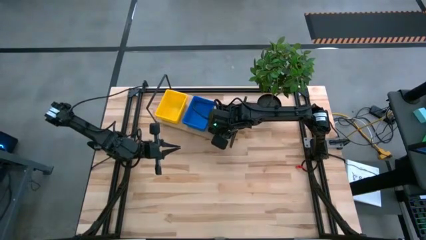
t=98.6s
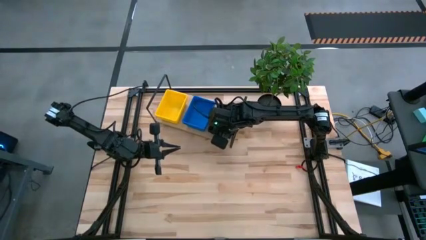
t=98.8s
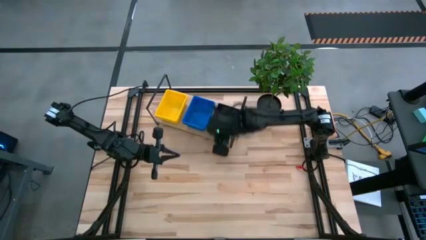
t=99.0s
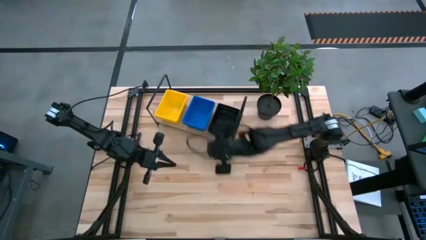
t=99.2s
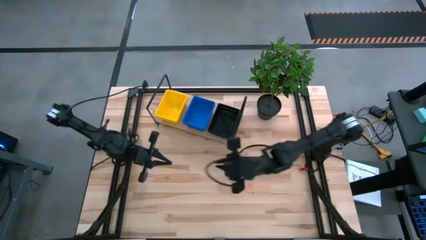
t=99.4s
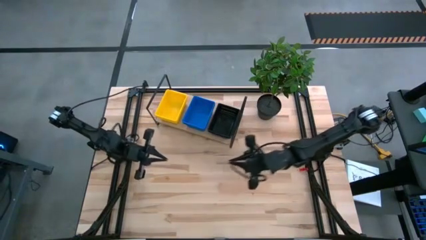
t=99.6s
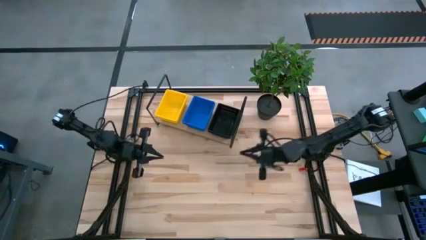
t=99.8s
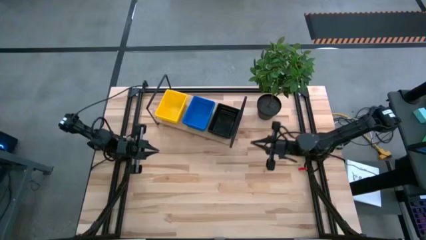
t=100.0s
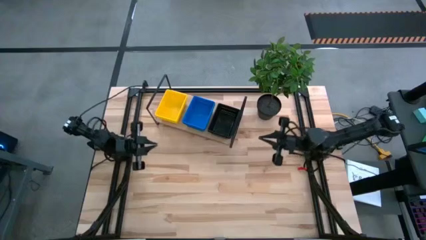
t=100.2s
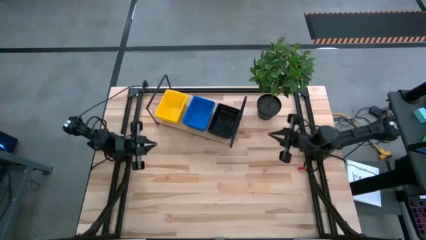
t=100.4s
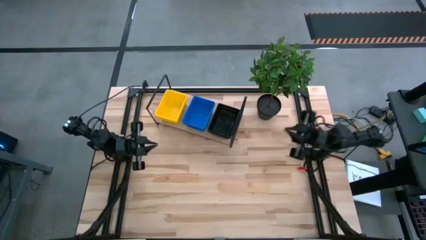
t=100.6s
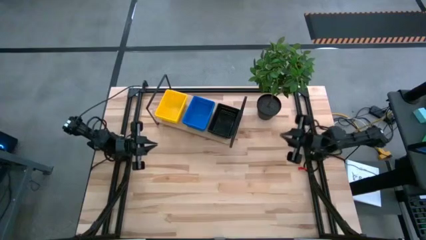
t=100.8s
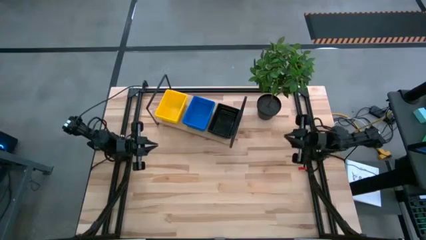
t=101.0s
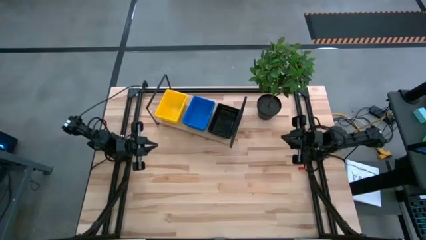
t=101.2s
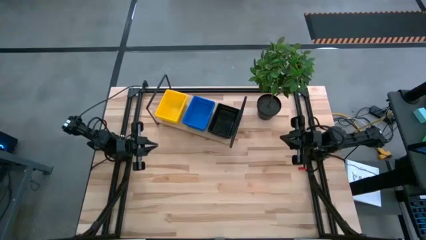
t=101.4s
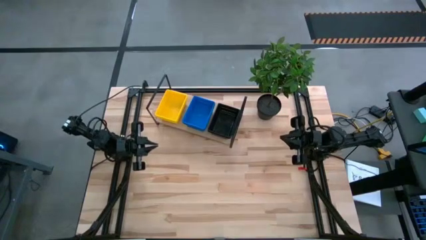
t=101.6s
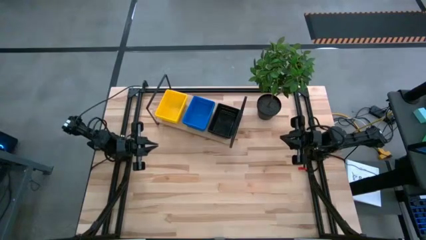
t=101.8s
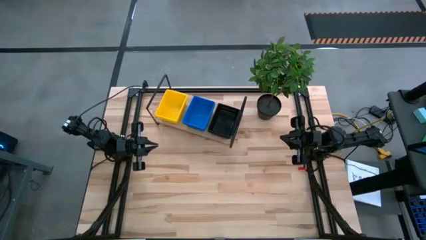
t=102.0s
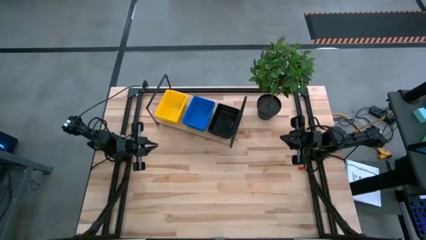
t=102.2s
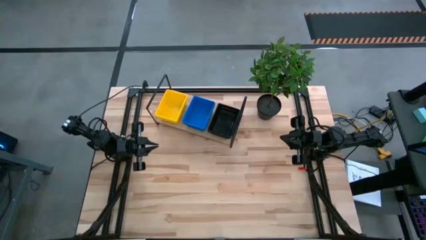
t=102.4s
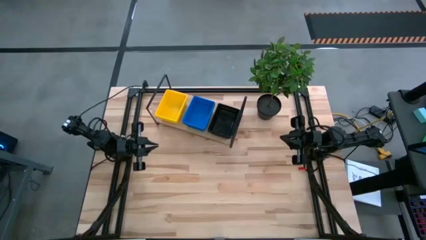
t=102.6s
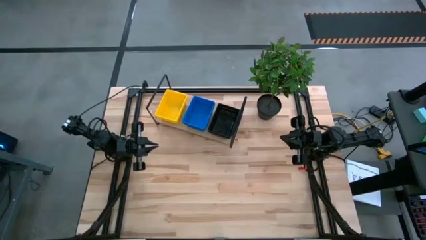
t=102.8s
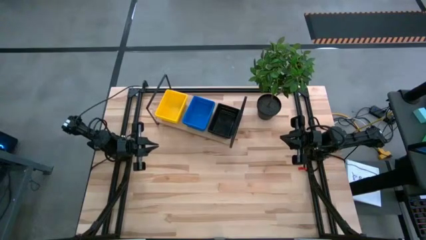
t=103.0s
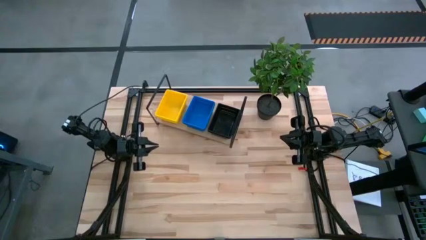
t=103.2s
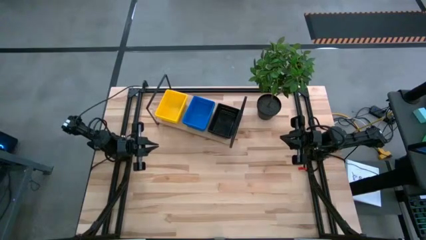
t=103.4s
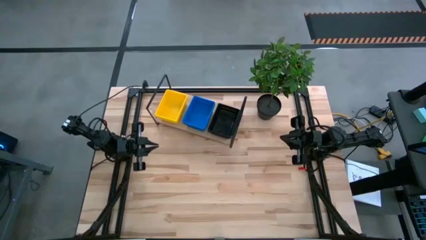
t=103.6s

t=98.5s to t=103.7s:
Task: Stack baskets on shelf by color
Return to Home Position

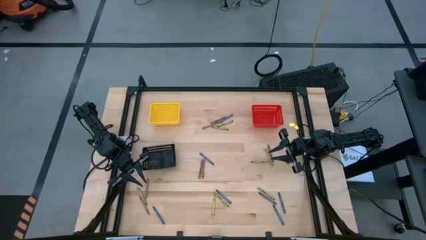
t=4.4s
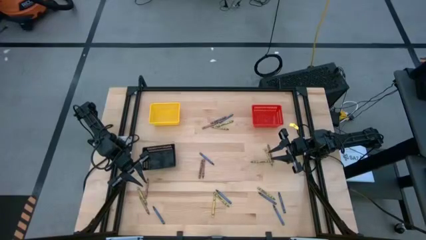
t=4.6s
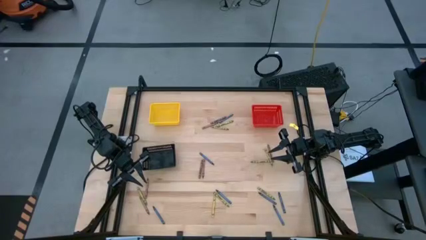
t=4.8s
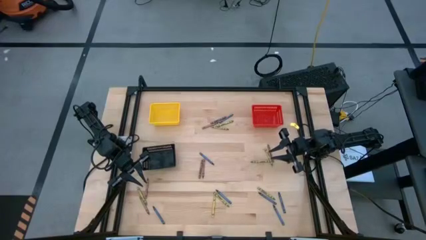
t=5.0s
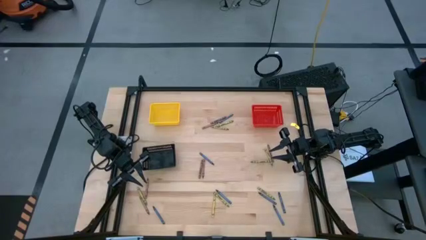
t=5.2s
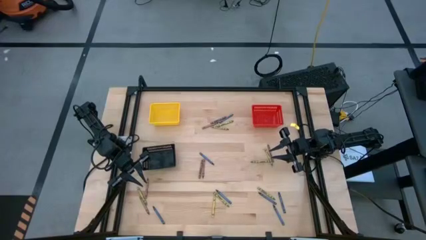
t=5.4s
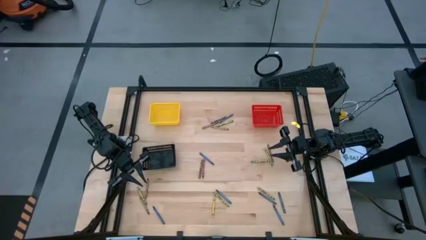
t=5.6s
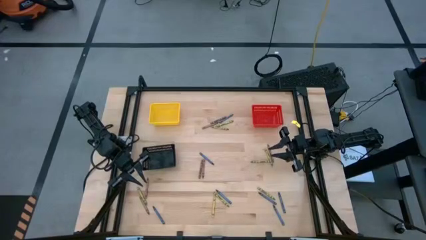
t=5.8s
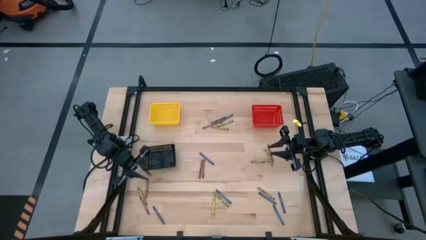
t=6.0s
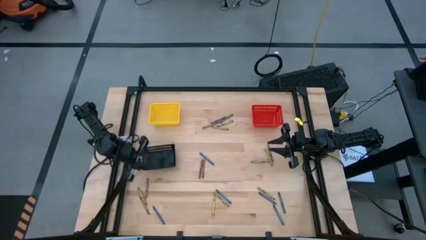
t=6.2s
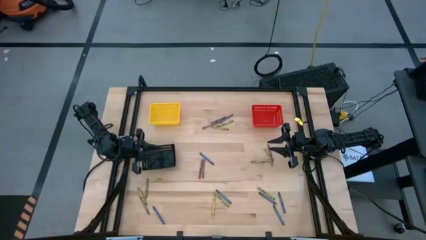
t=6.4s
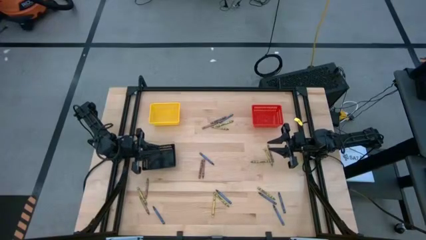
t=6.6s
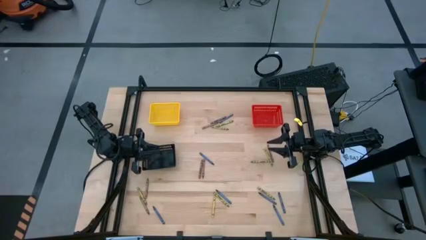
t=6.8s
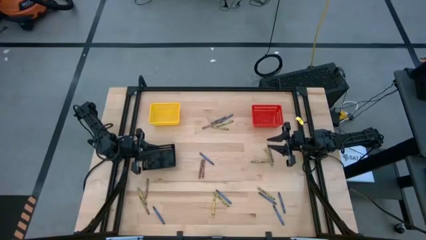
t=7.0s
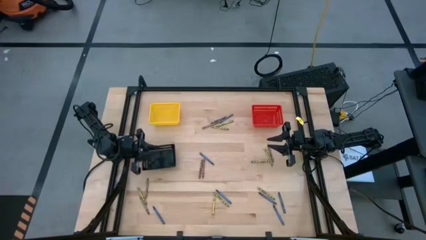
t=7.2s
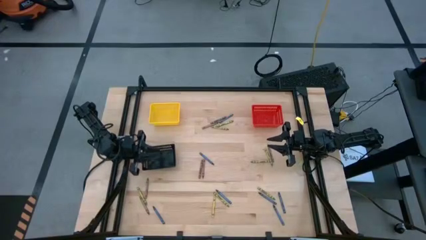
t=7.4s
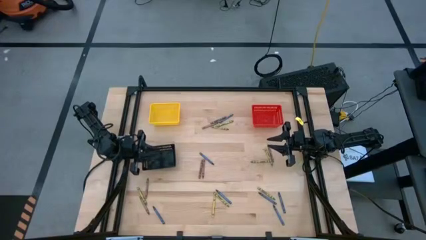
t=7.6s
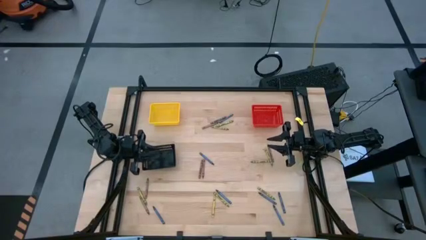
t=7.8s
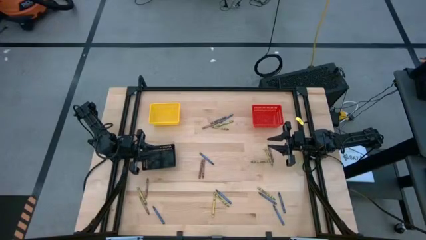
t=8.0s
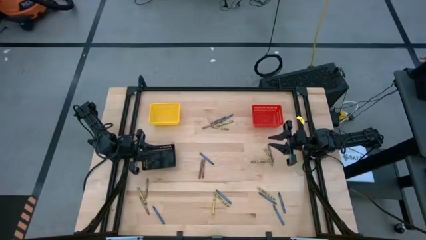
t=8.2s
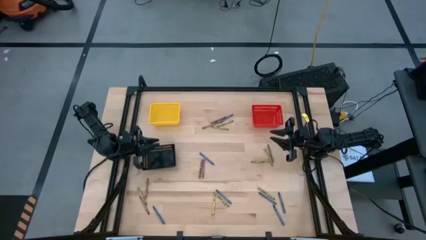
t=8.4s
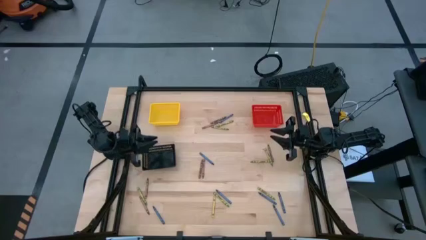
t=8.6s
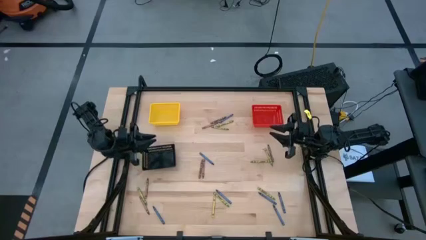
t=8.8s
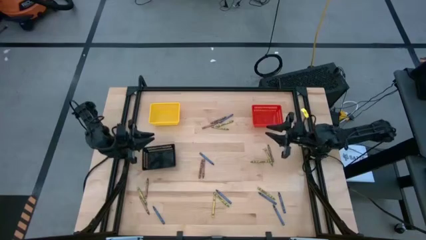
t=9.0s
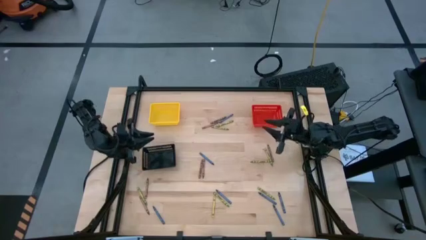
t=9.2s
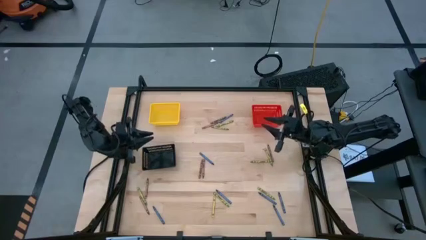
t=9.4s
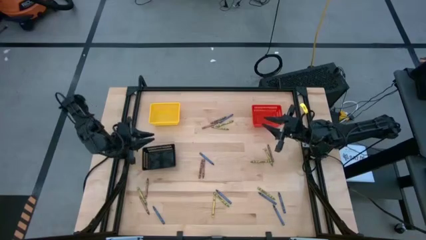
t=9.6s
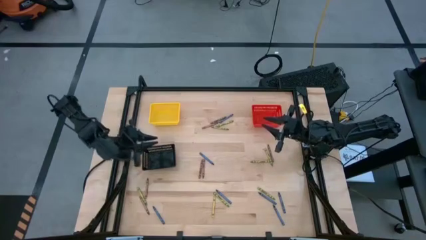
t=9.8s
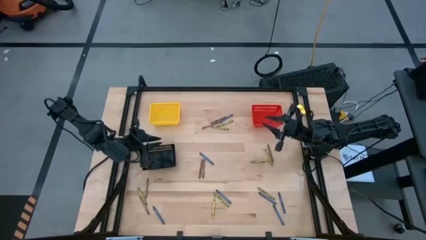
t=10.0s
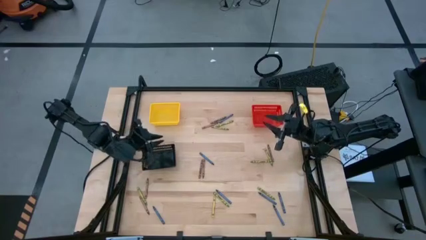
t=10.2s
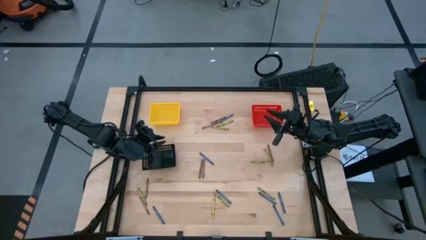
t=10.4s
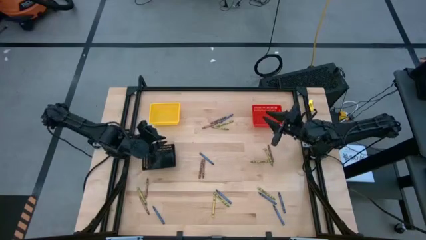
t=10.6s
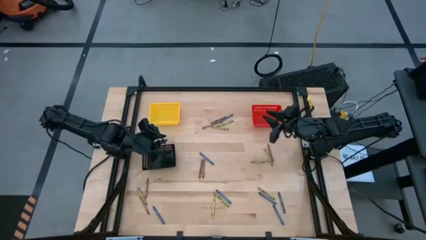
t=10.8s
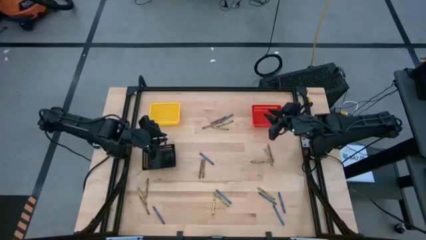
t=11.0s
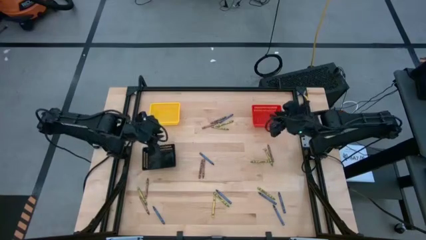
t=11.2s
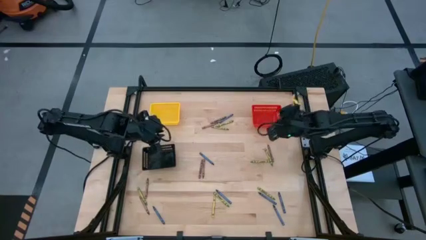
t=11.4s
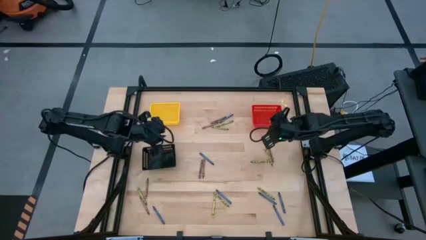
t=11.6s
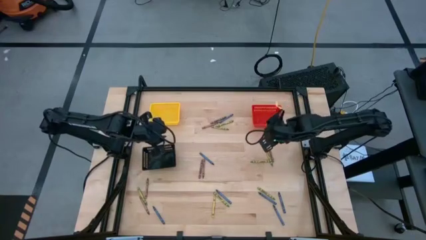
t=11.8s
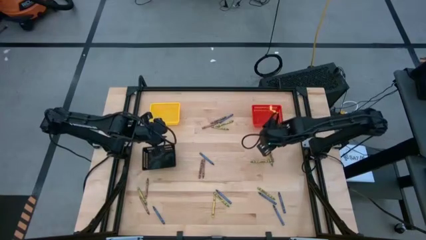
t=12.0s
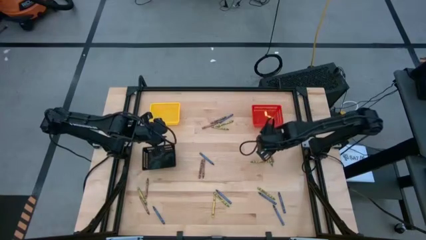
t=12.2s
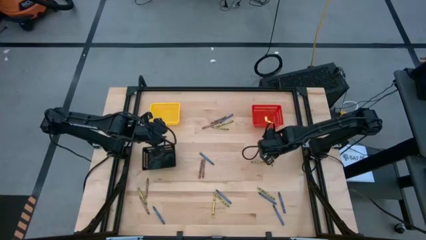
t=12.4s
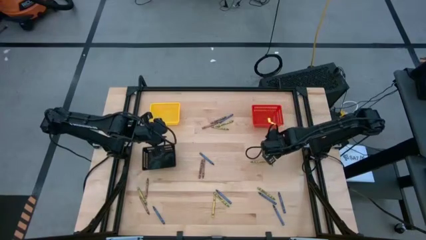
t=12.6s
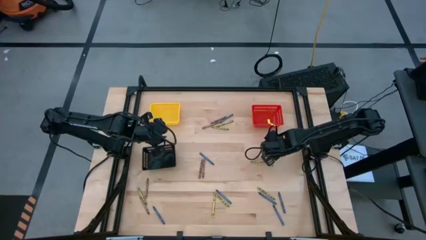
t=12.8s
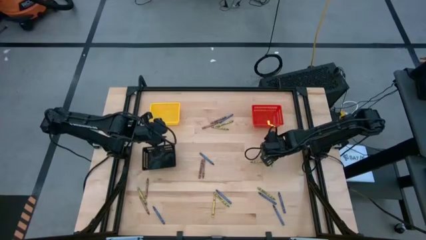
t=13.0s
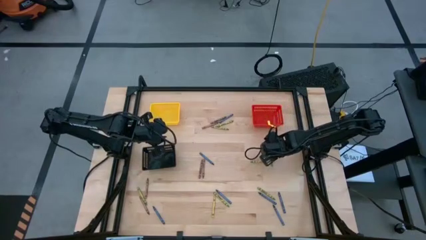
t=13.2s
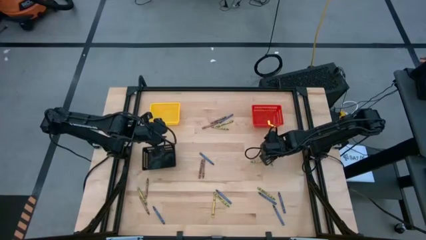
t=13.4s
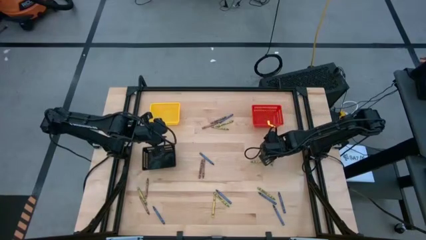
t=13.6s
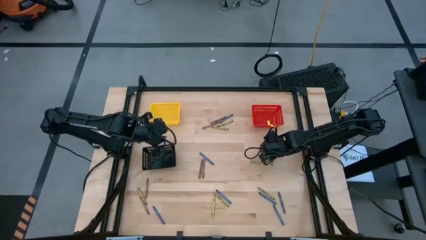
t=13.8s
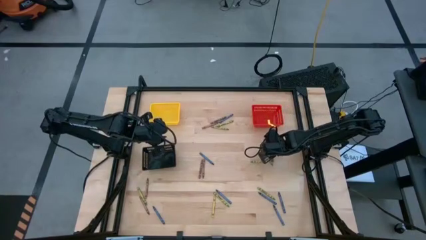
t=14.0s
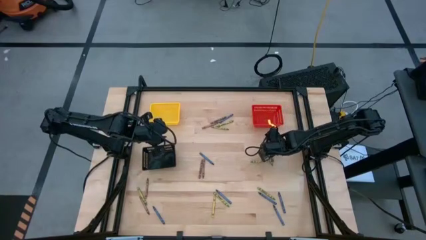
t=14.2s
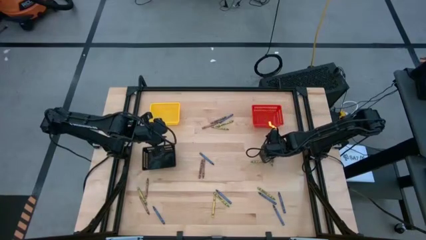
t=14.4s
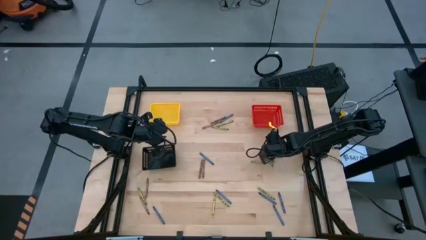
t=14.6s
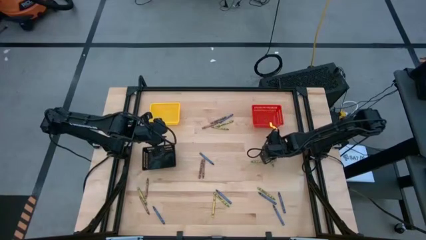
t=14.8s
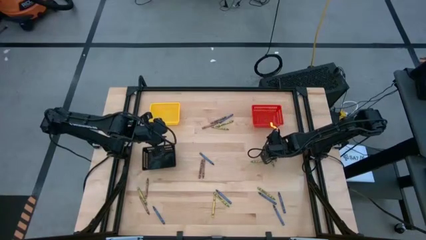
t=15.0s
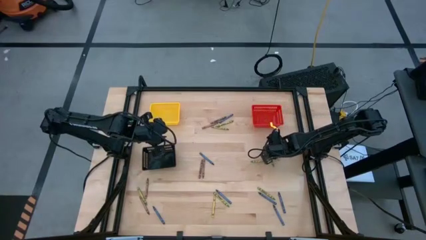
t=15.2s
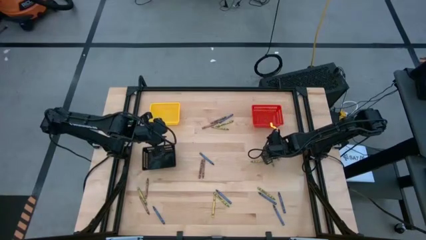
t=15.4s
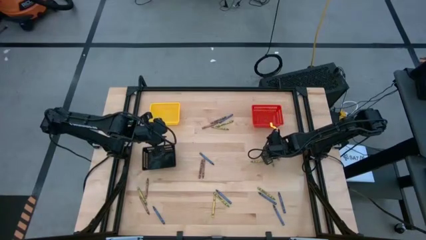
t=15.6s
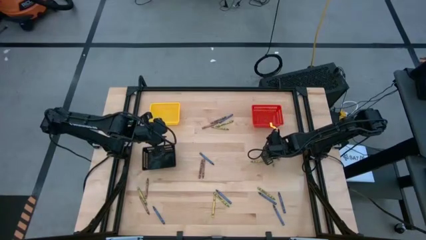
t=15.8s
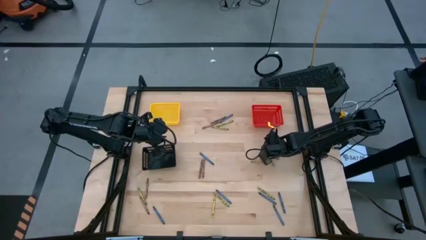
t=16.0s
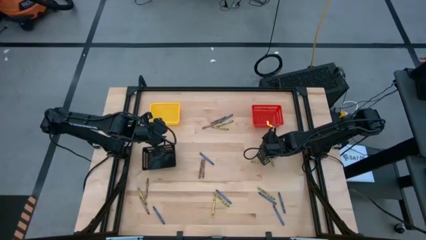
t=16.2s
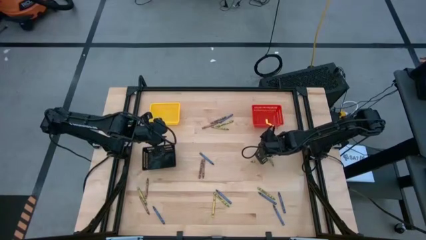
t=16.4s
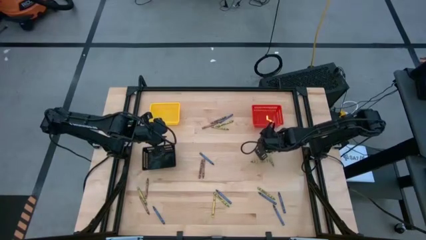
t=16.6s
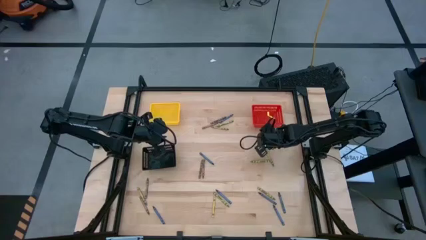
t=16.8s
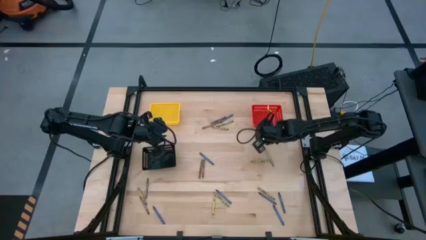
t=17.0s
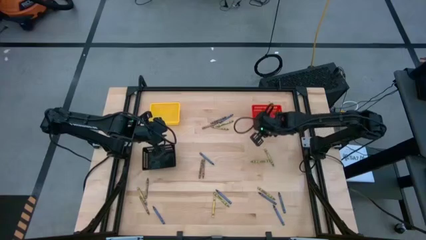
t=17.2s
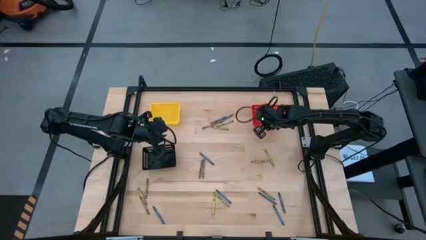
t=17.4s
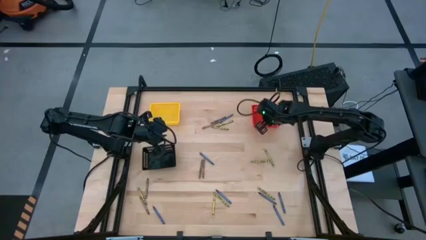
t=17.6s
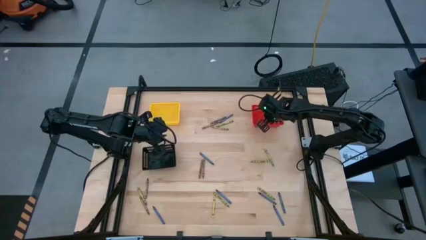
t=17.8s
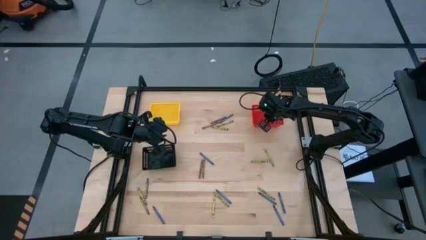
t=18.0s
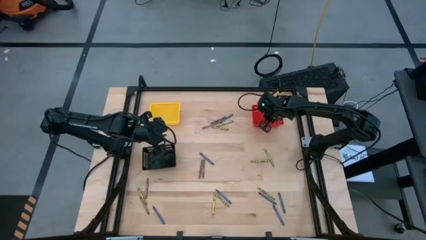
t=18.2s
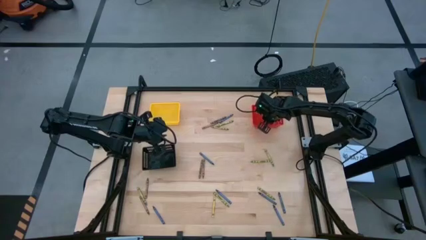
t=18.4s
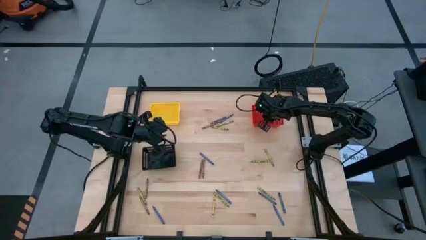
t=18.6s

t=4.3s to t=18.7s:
Task: Sort crayons
Put the brown crayon into the red bin
